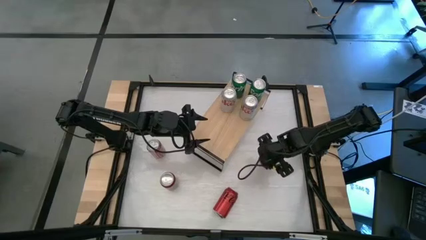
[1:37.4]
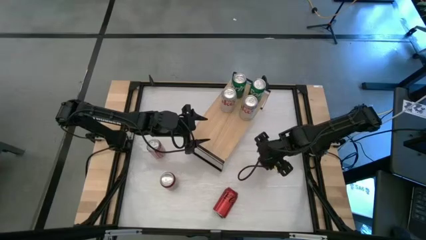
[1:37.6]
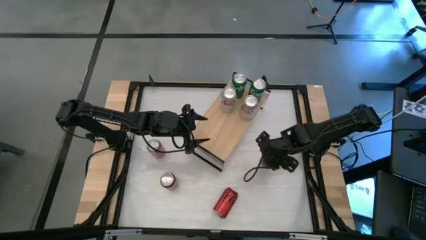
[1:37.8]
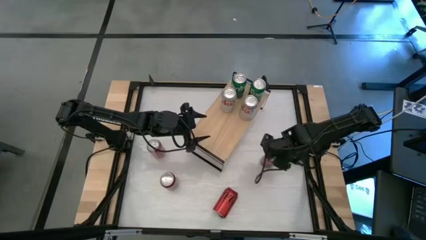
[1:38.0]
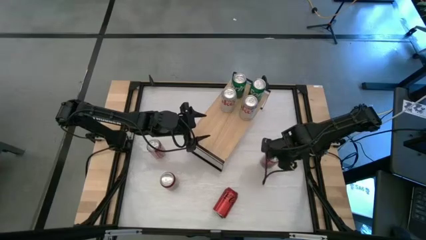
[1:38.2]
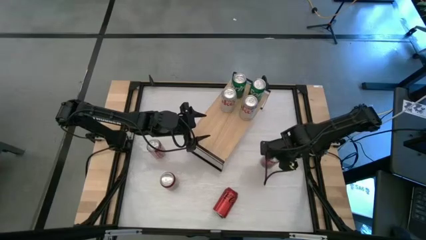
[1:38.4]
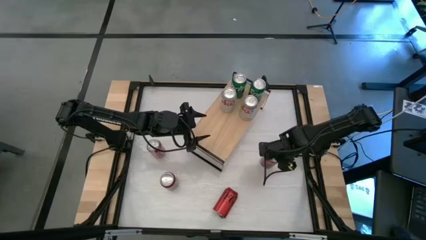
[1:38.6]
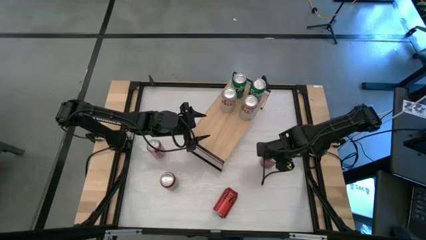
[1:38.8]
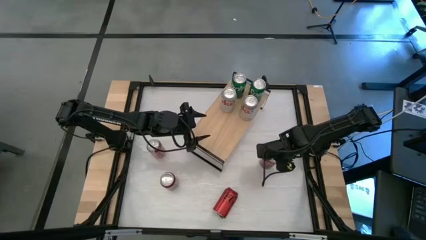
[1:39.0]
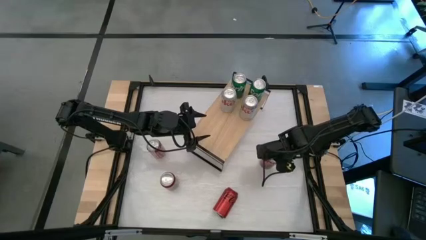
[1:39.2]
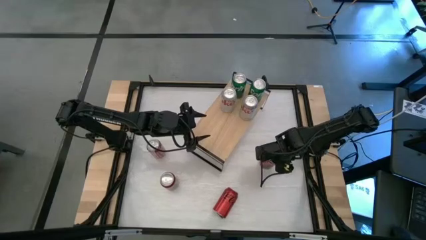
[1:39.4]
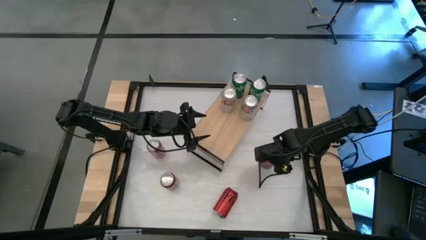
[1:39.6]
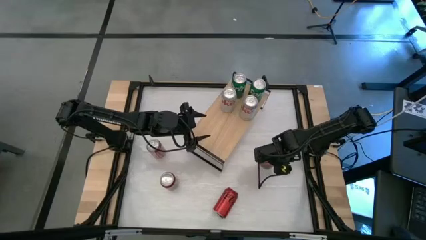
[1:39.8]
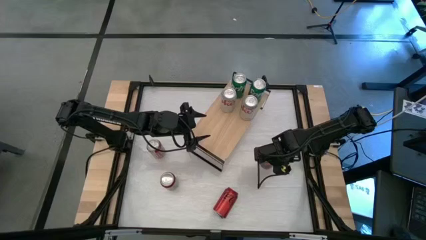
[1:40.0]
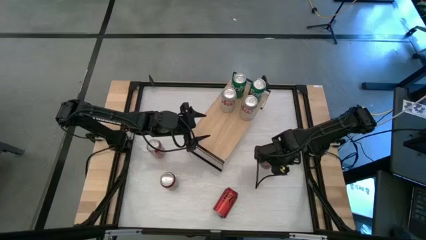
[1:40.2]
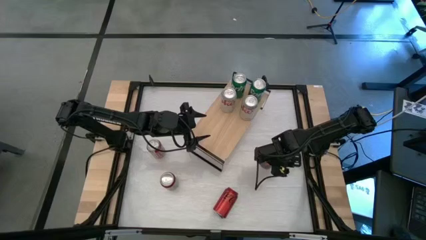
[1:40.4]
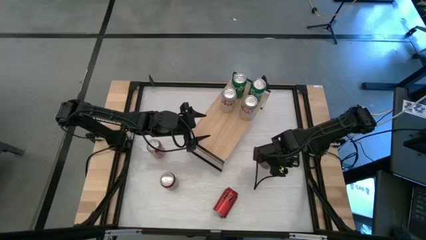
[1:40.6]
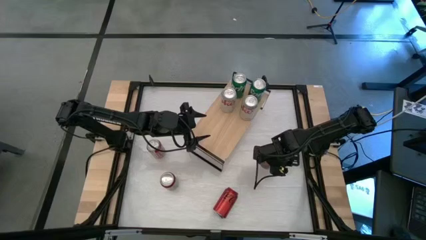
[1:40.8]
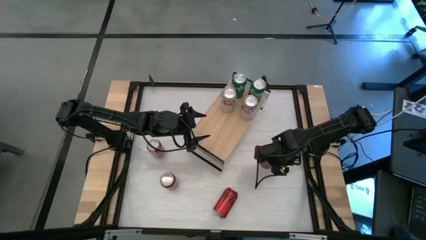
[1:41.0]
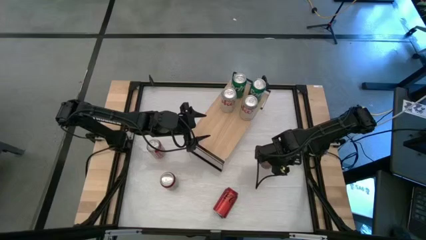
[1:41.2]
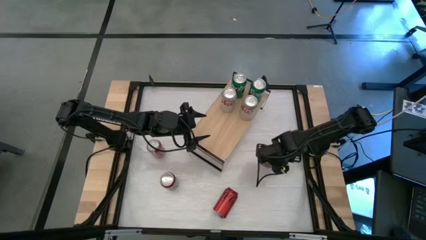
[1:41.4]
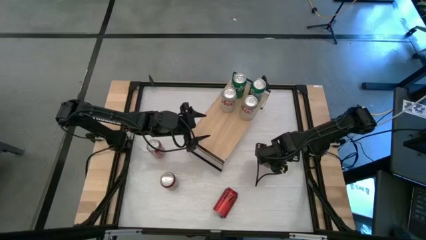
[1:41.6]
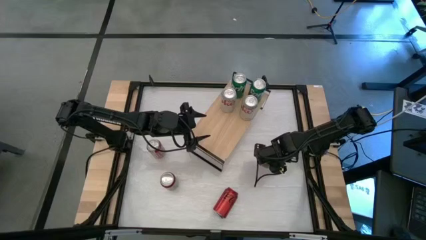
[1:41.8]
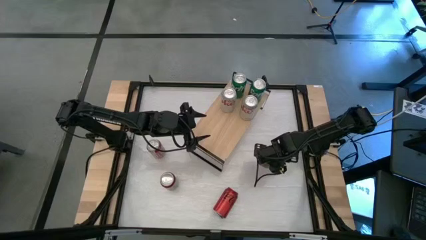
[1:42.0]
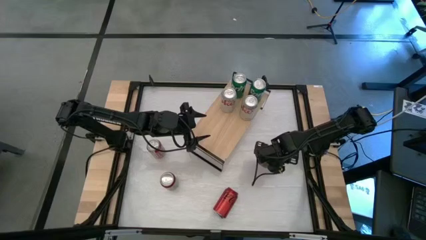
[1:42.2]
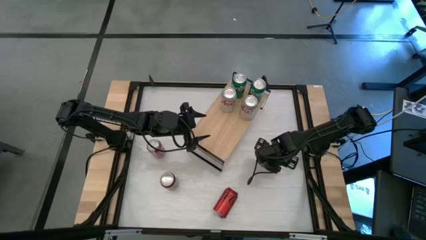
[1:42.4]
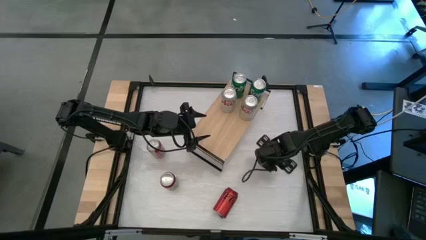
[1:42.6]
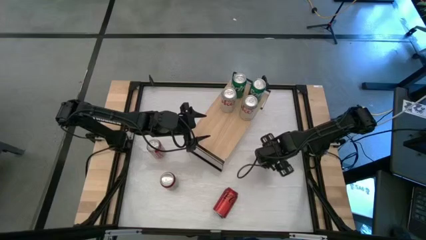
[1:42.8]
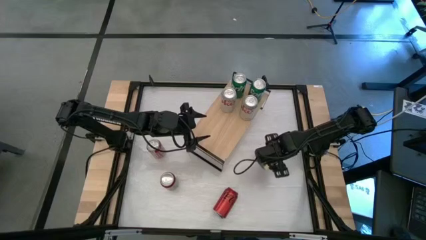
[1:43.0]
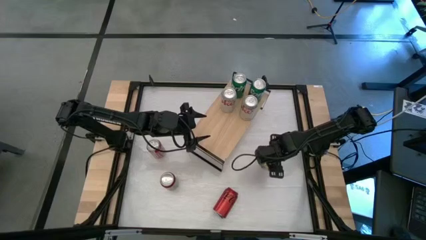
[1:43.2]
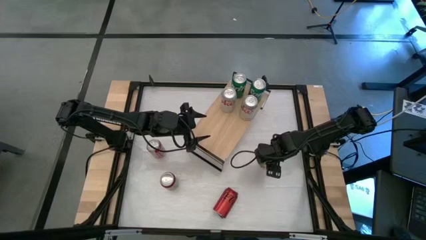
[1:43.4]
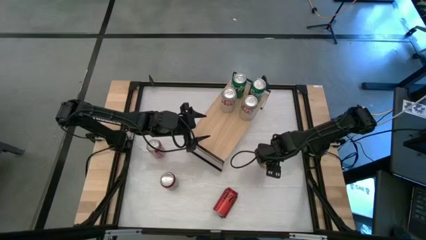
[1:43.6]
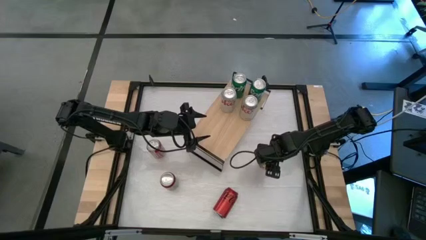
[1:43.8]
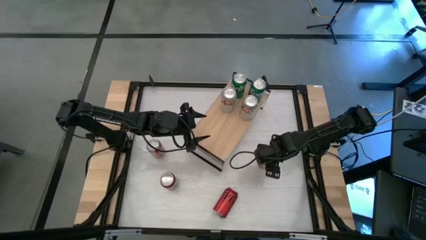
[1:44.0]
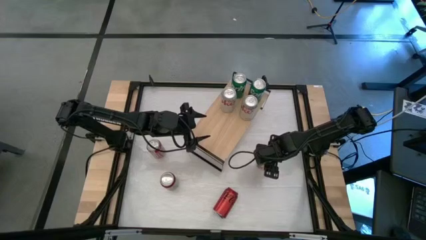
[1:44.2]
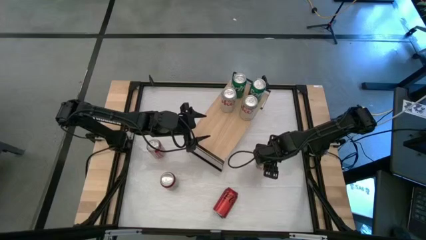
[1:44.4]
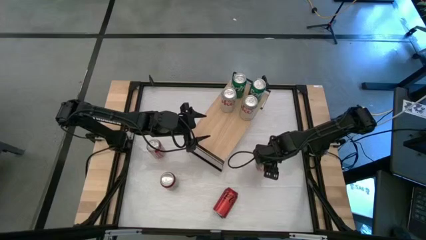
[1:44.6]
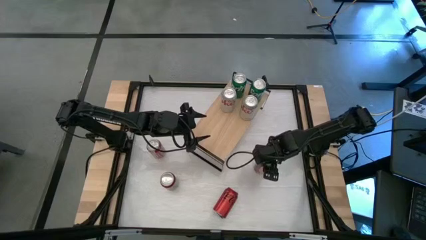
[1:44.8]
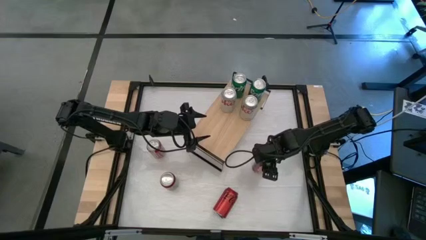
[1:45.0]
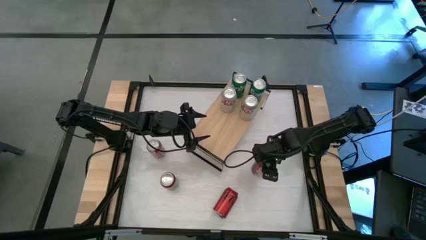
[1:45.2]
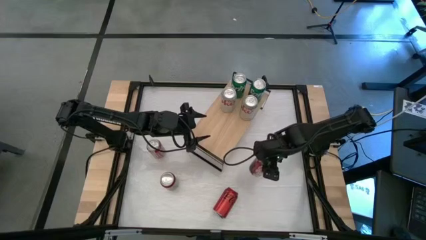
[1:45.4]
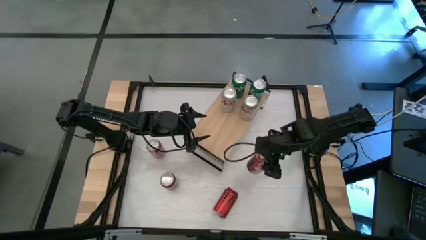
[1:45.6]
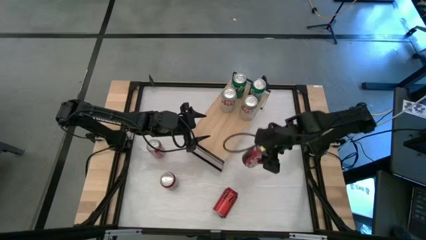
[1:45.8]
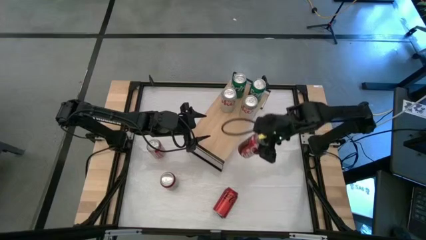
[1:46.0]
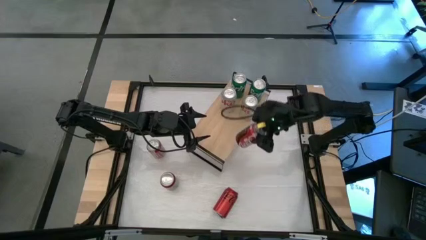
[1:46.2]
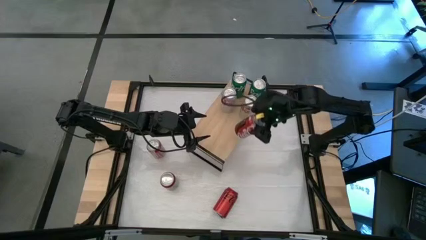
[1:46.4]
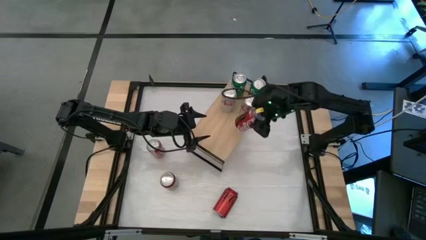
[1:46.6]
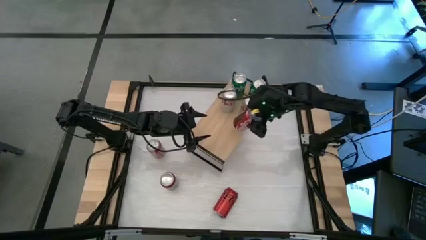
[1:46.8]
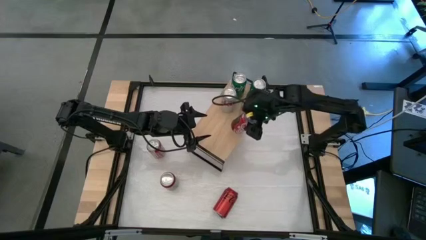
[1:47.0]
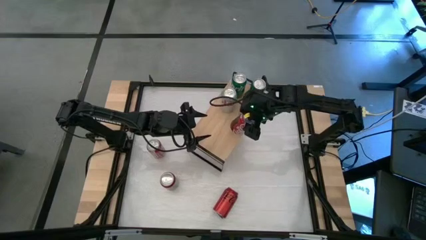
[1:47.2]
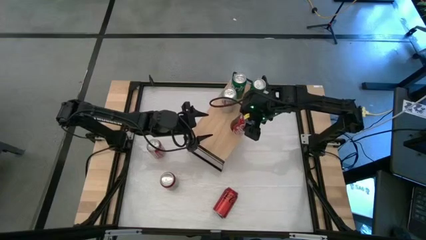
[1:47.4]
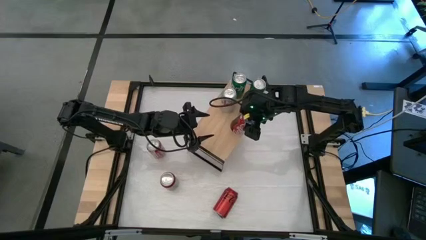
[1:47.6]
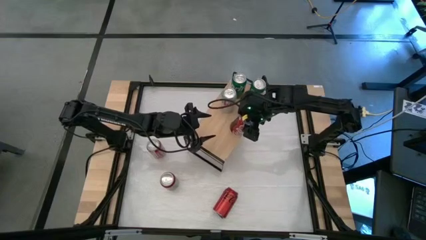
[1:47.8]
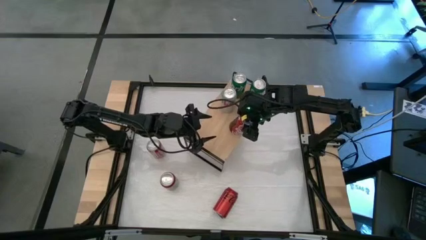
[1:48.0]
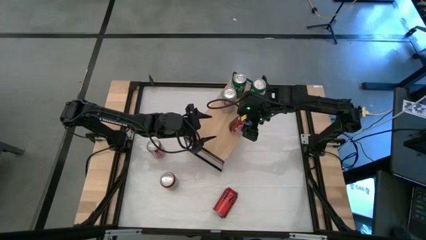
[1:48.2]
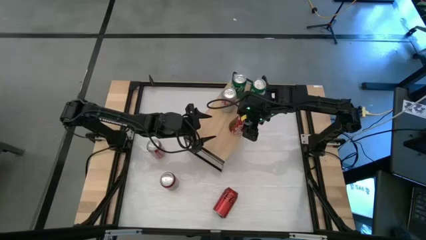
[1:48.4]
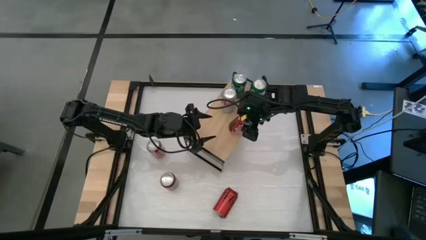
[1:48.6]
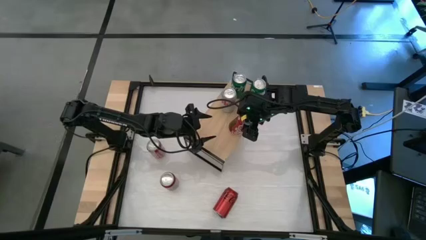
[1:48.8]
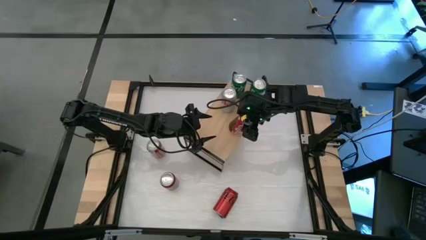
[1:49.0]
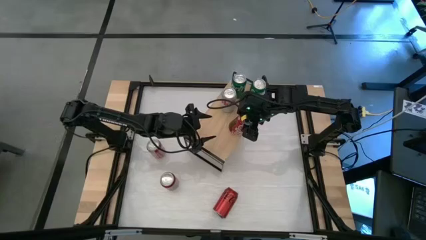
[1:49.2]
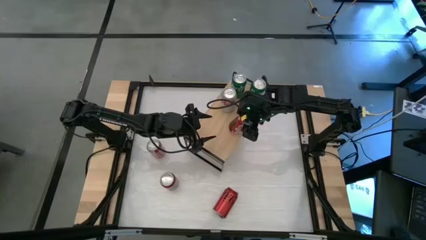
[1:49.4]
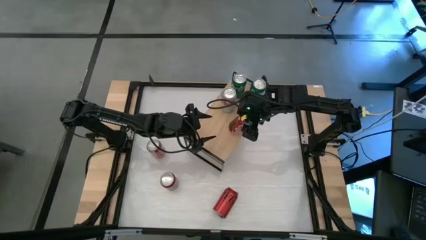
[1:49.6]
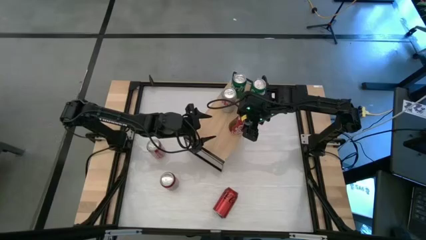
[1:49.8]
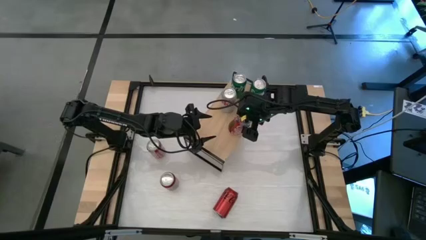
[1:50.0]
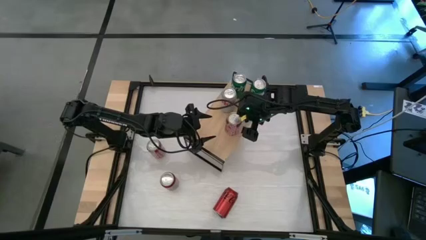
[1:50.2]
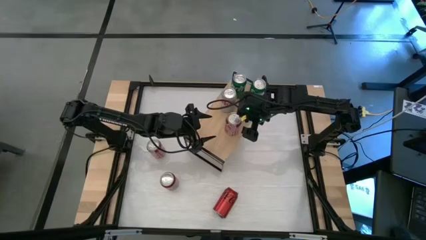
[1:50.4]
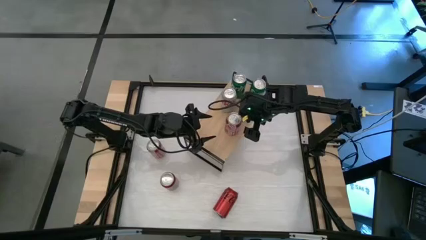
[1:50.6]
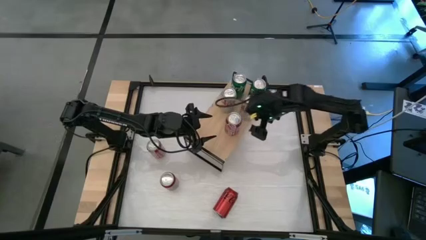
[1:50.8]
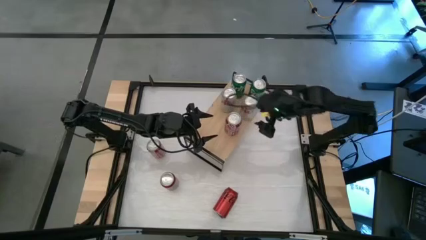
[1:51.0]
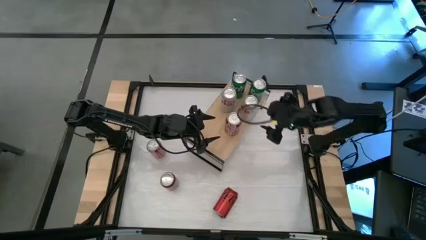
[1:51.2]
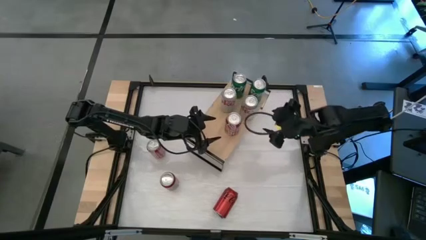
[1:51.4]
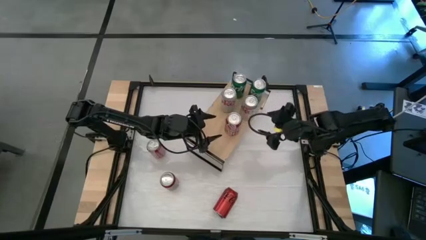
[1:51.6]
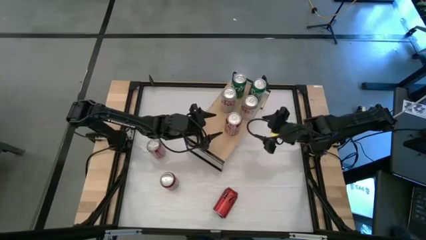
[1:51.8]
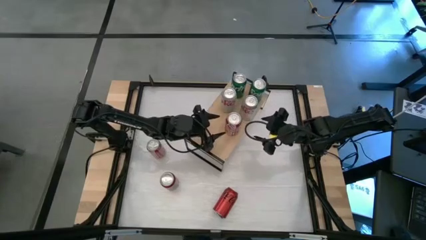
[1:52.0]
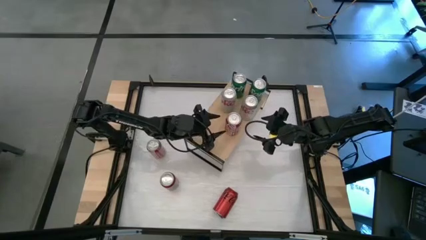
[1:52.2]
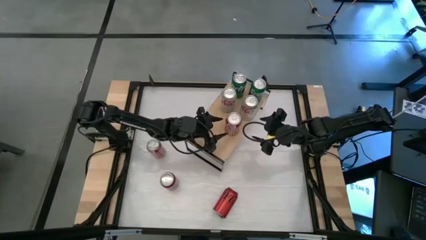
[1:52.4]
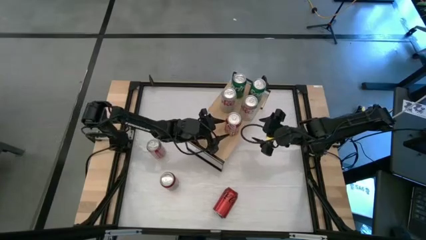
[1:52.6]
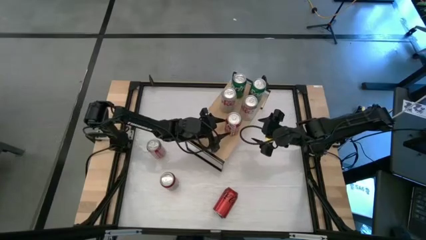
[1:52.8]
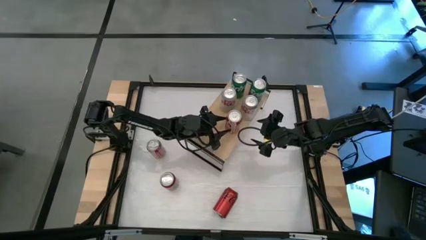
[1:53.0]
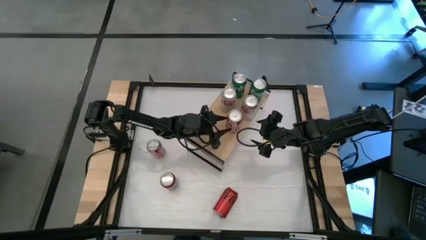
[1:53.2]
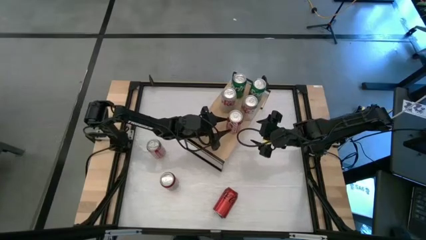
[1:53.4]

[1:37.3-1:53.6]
Task: Place canned beverage on shelf
Put the right red-white soda can on the shelf
